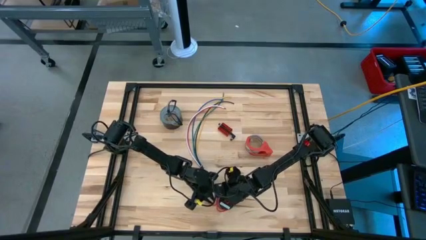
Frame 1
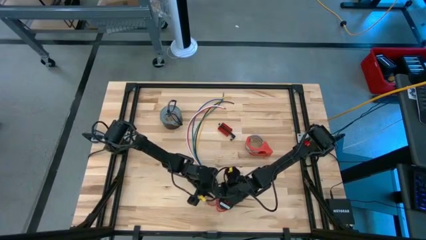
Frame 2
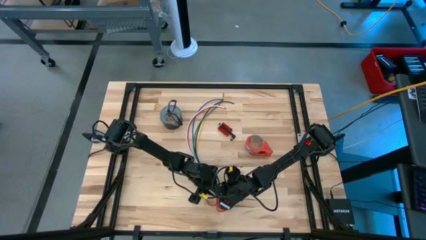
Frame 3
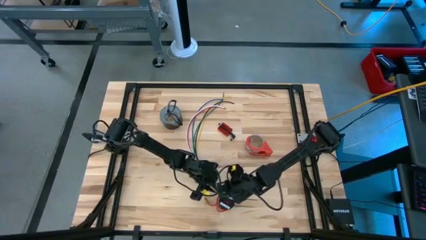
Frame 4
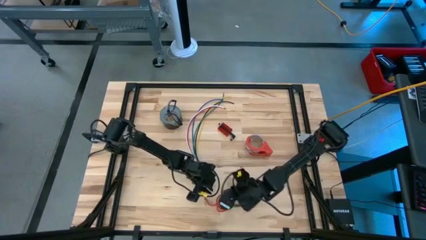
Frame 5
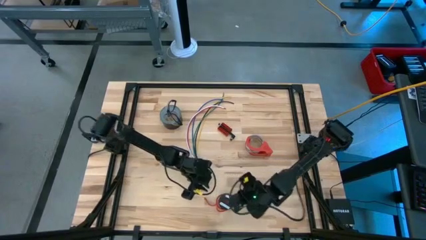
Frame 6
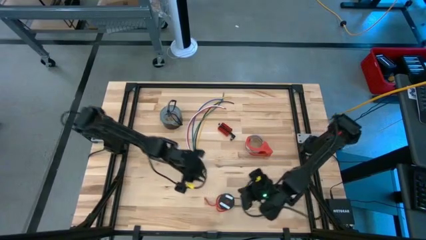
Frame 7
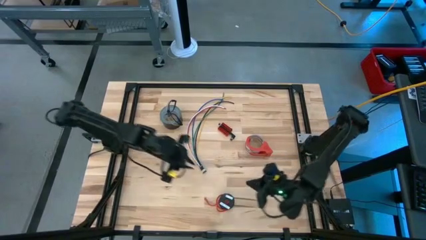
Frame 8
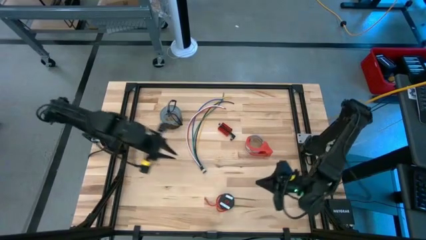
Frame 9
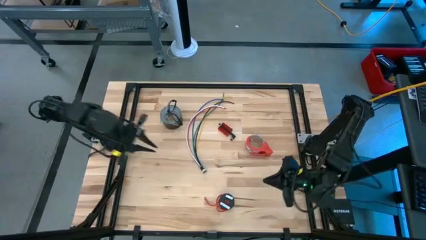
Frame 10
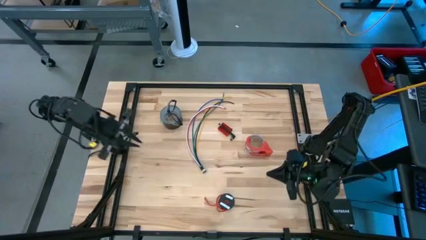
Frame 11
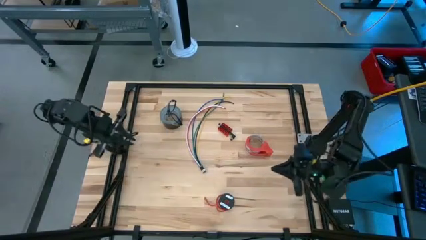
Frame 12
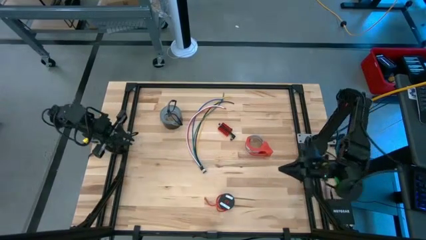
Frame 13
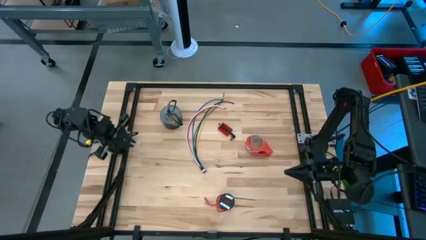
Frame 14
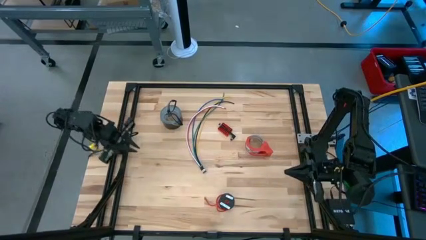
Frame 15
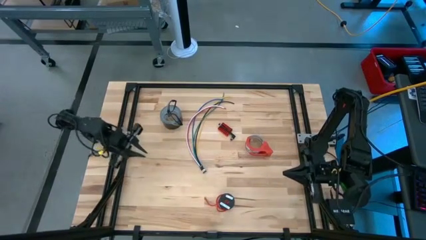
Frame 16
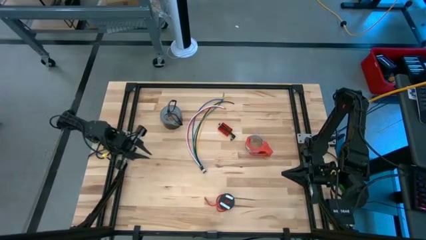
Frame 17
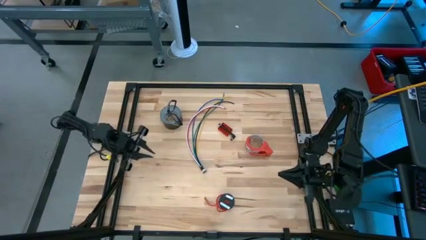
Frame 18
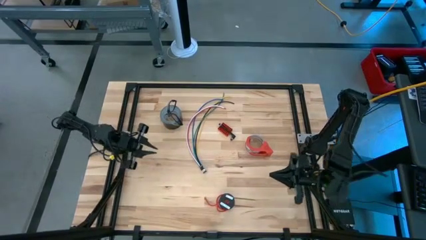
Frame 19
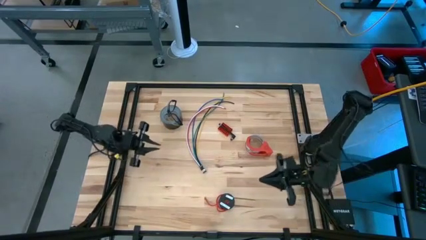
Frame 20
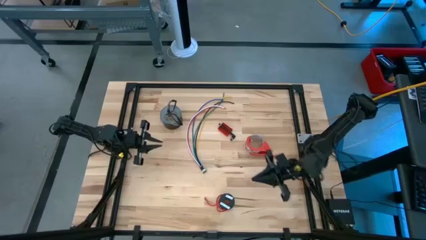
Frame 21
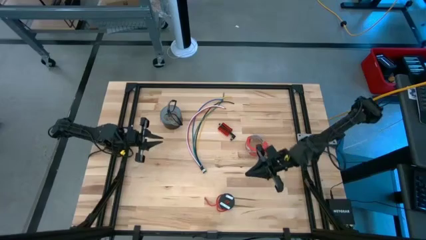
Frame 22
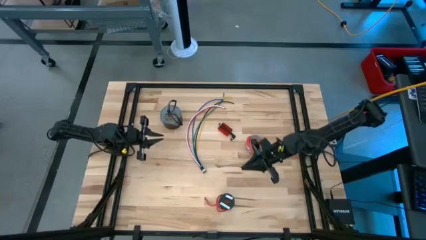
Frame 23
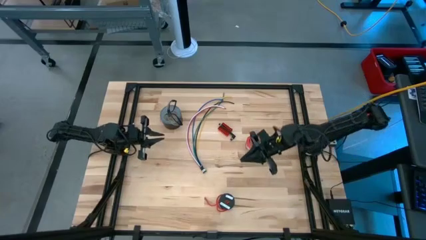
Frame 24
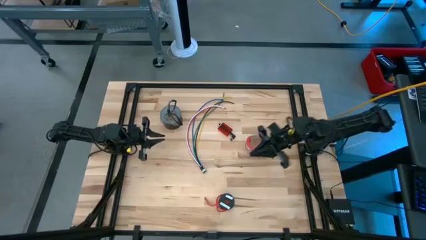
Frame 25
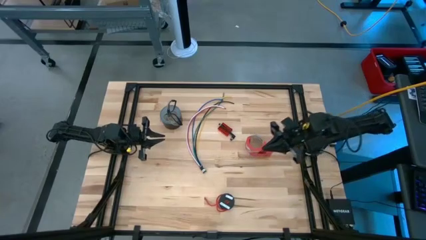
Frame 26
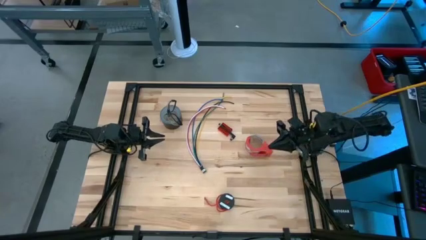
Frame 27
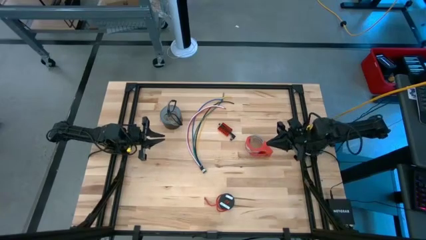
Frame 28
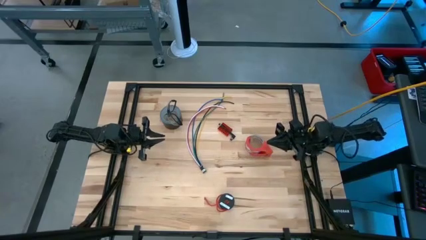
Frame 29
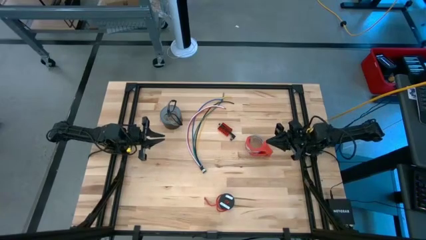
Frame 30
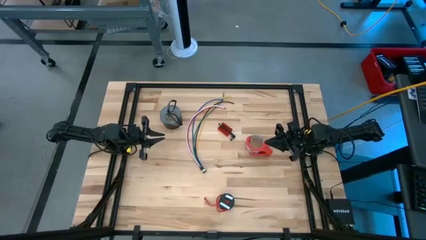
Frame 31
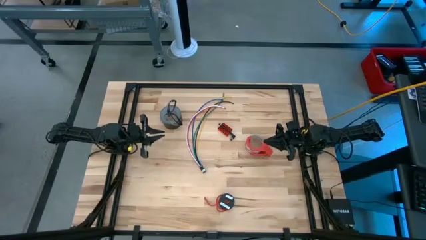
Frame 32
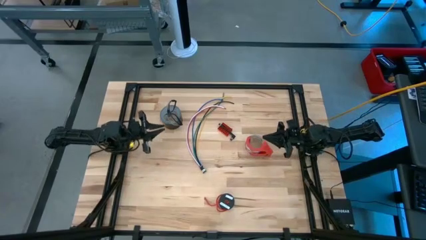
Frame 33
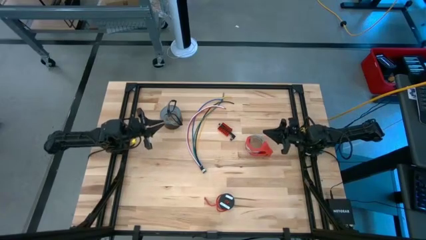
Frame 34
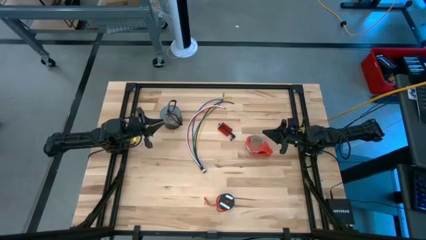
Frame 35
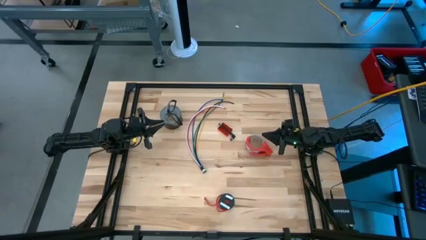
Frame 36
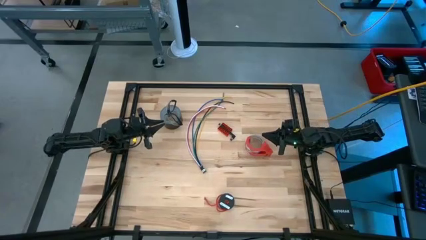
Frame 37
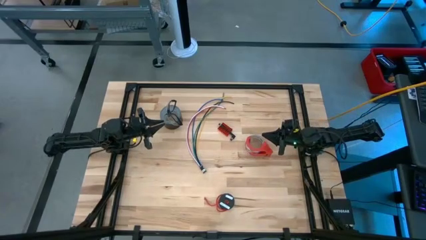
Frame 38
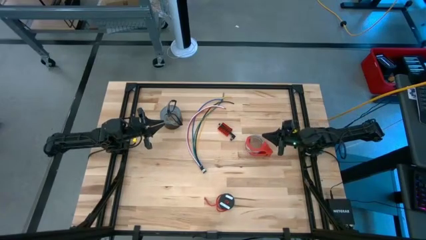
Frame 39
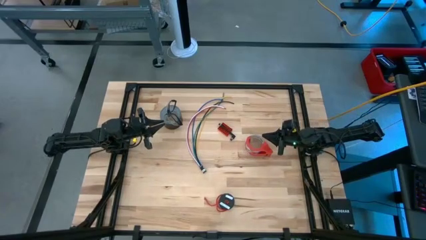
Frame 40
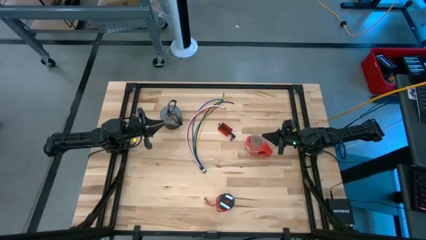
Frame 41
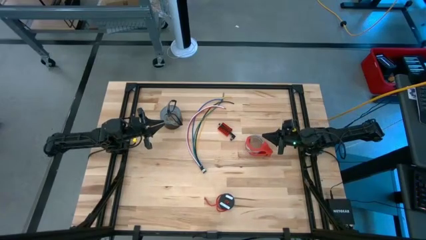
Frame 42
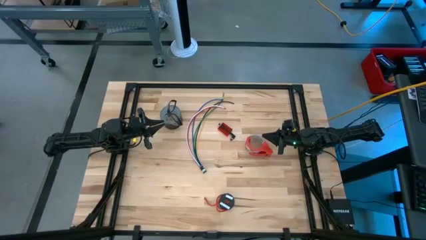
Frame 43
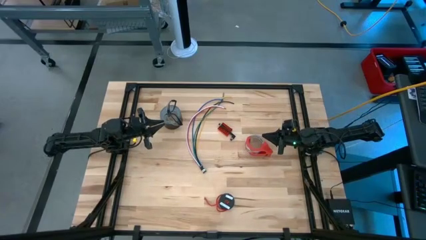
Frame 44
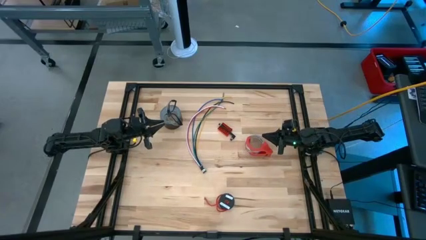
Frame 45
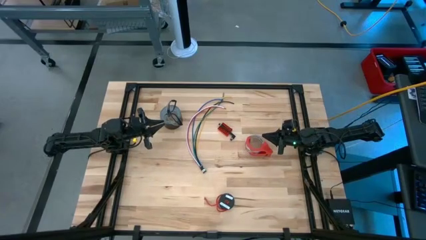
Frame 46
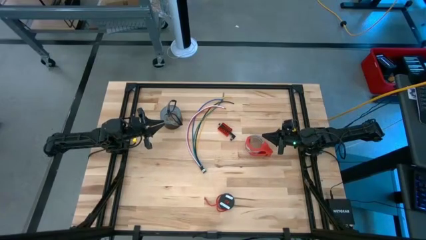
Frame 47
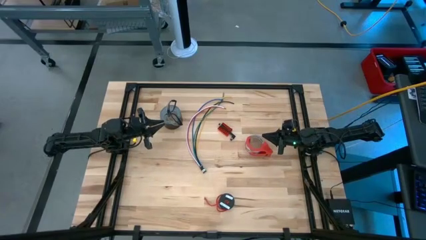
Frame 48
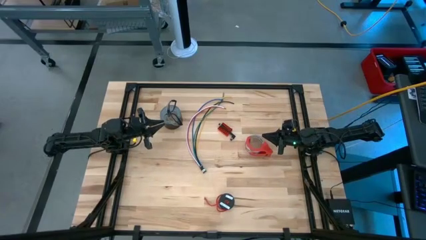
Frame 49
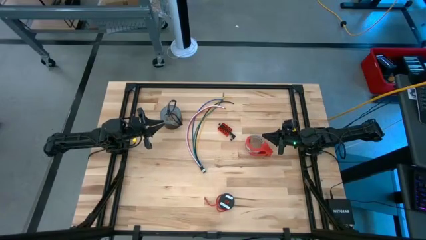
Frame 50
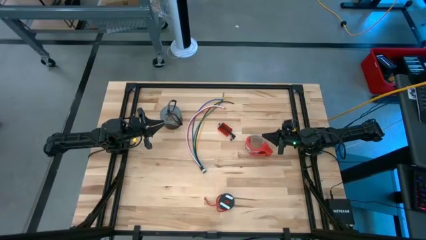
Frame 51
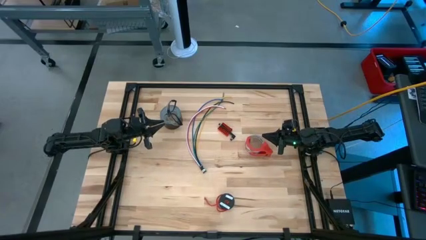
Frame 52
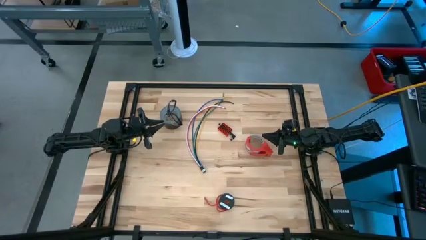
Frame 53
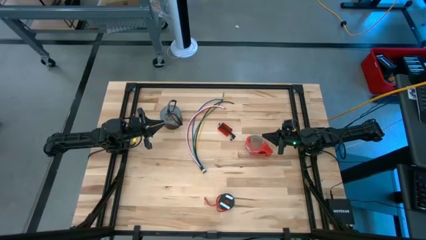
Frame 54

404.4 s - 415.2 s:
Task: Coil cords
Return to Home Position

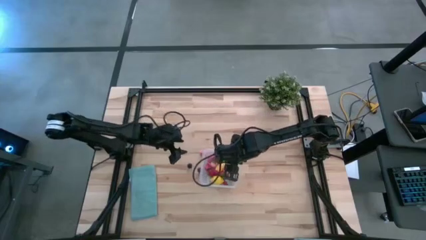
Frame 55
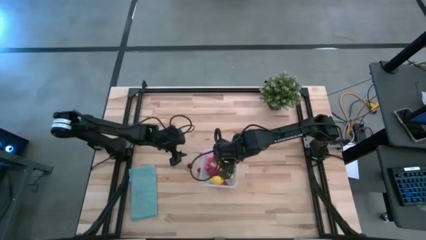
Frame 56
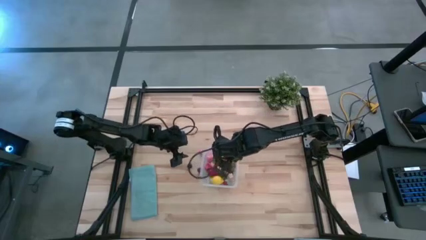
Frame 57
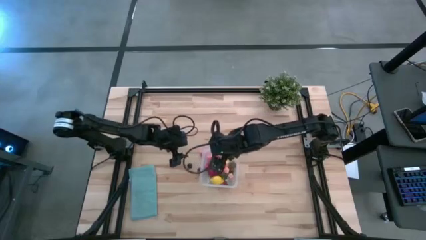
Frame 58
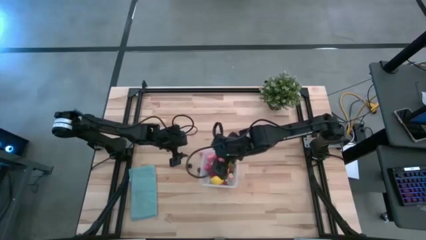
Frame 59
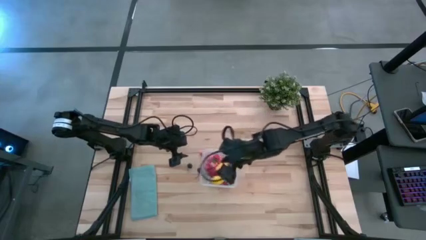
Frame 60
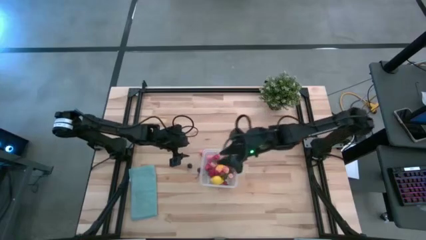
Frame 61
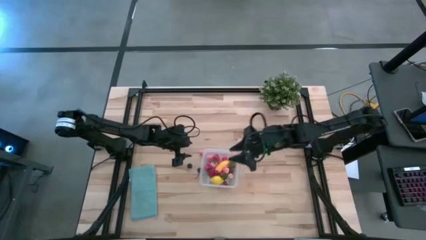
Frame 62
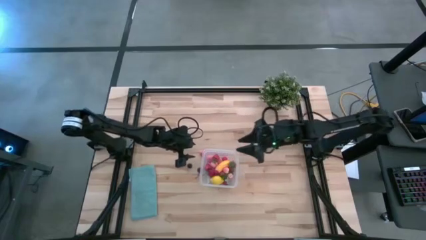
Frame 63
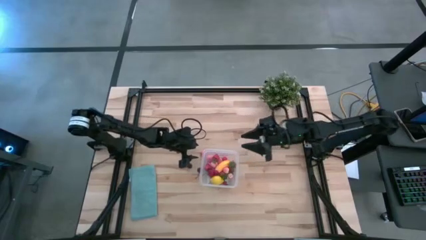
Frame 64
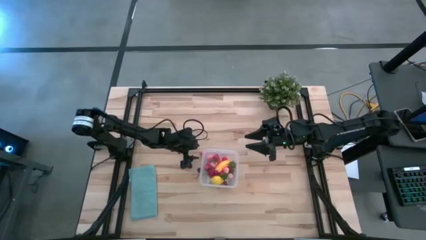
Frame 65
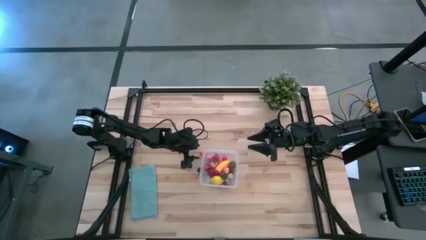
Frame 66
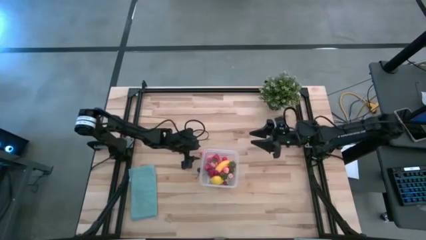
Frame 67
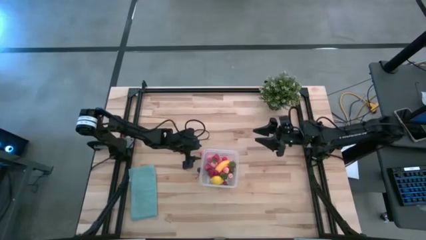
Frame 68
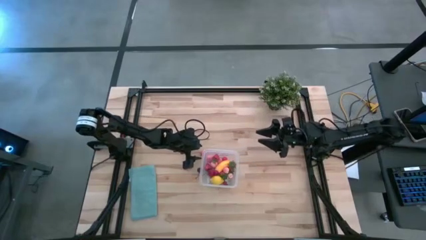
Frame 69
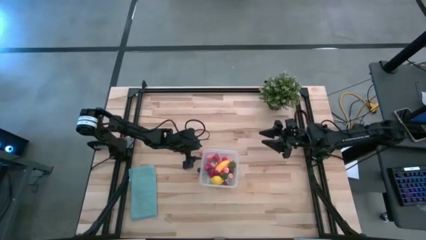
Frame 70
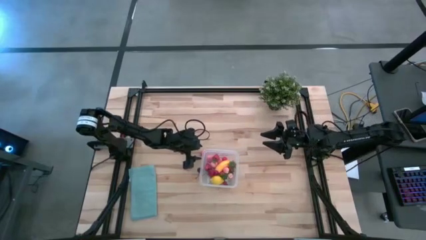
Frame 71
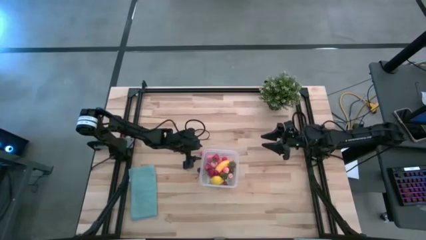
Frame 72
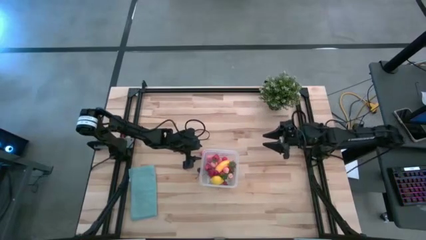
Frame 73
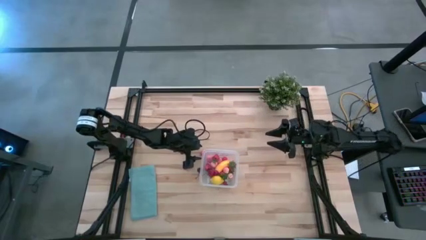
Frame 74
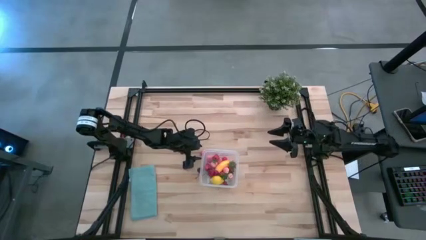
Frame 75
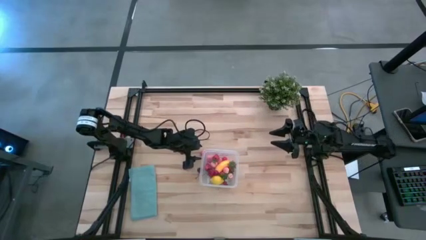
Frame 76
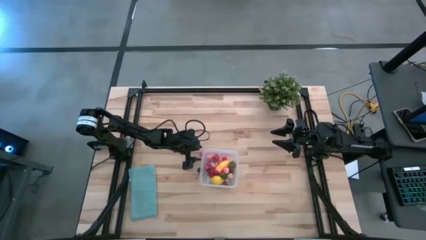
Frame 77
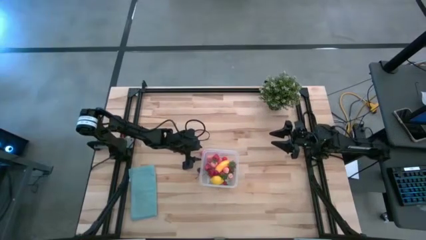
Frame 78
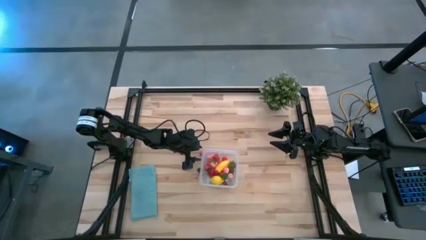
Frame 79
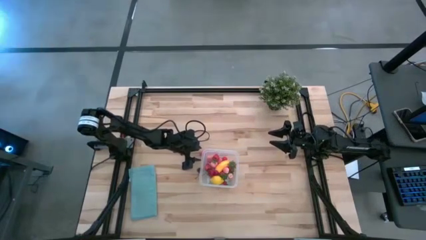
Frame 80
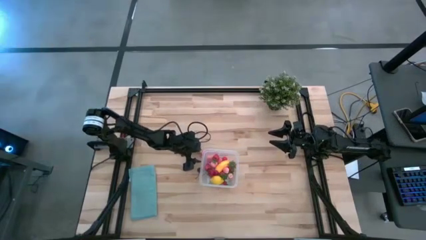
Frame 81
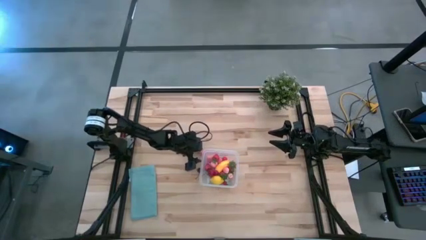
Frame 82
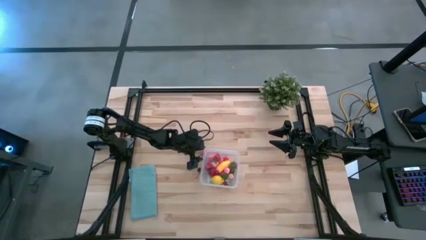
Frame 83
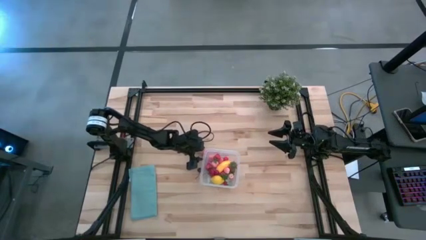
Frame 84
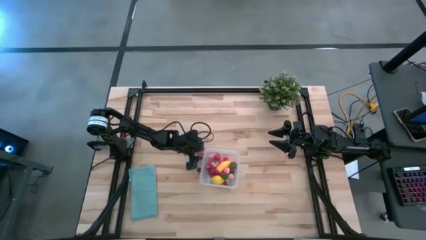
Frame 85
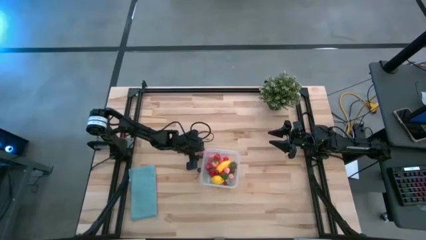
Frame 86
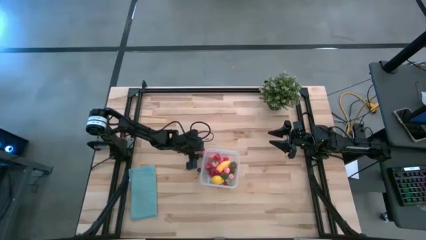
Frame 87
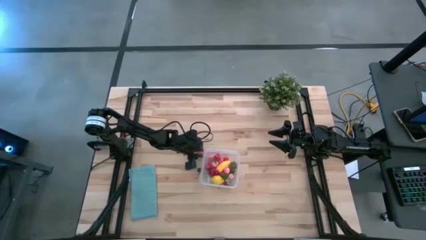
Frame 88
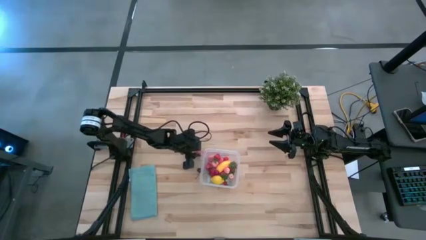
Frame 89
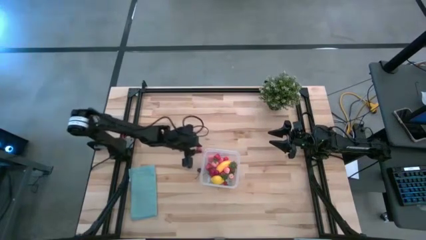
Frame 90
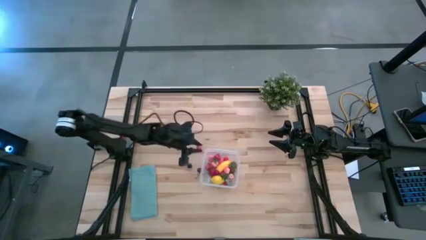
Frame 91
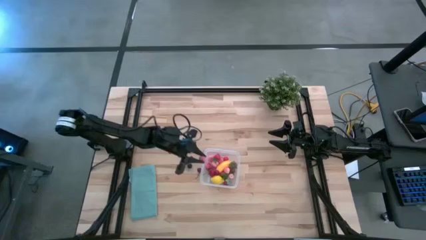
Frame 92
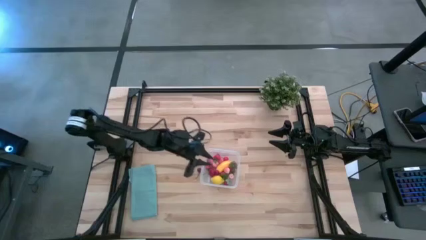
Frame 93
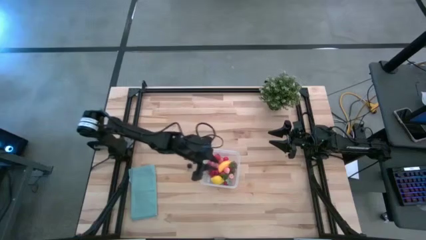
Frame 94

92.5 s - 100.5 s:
Task: Pick and placing Produce into tupperware
Put the pink peach into the transparent container
